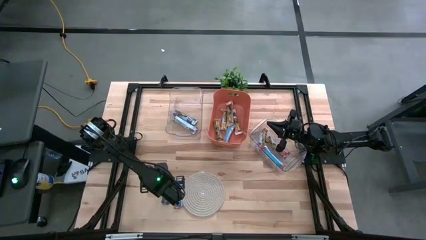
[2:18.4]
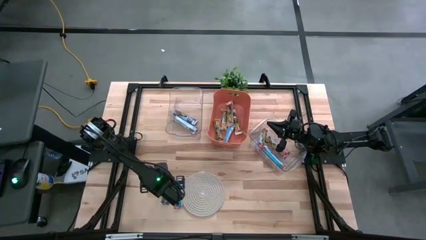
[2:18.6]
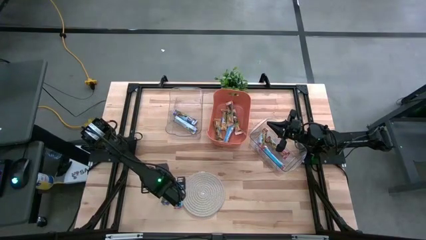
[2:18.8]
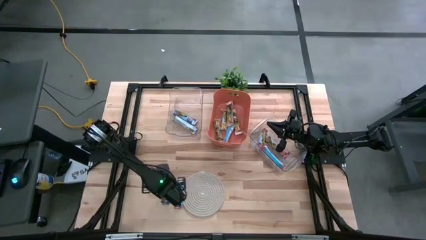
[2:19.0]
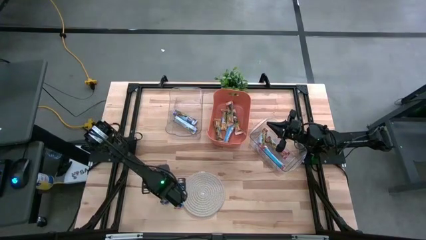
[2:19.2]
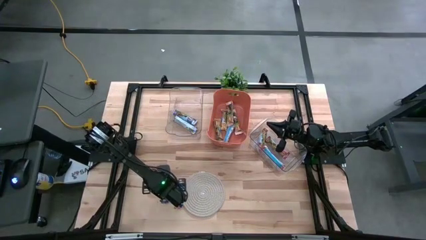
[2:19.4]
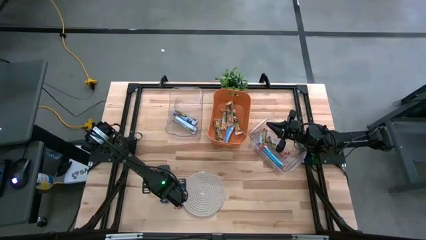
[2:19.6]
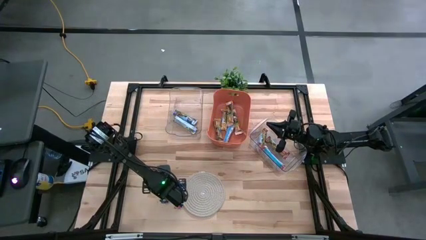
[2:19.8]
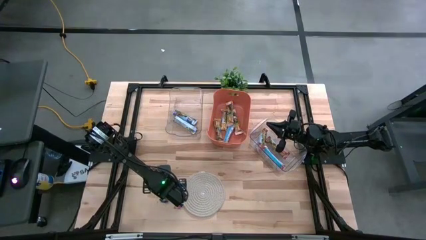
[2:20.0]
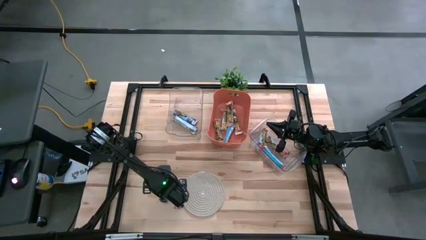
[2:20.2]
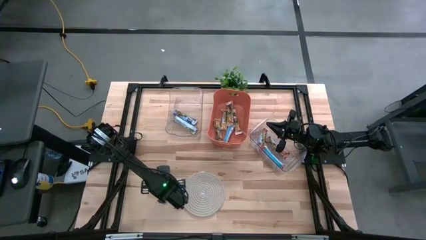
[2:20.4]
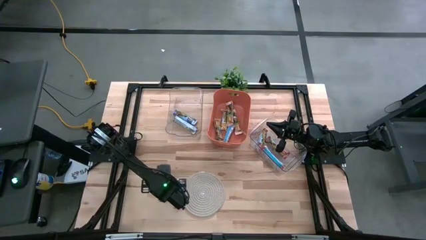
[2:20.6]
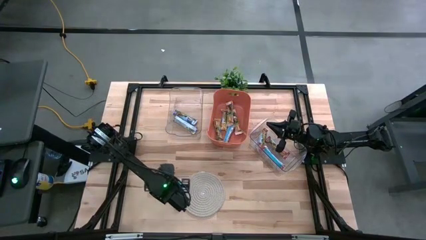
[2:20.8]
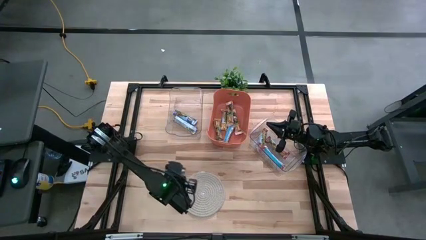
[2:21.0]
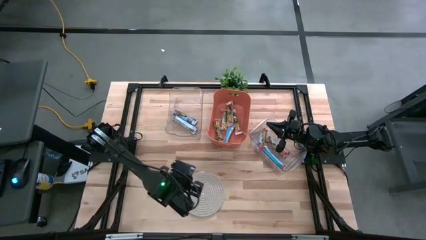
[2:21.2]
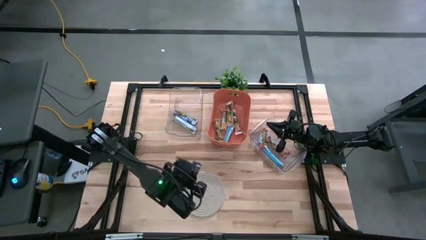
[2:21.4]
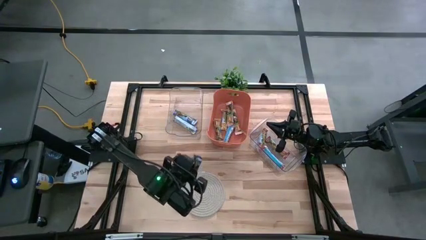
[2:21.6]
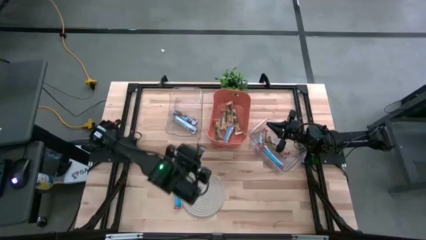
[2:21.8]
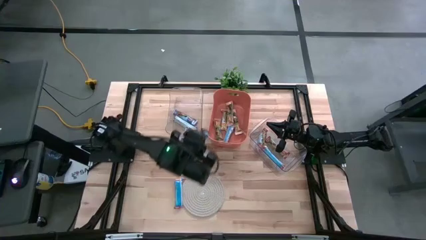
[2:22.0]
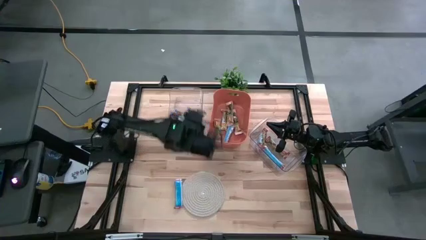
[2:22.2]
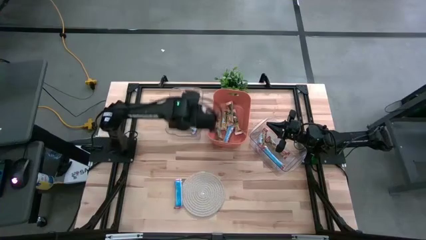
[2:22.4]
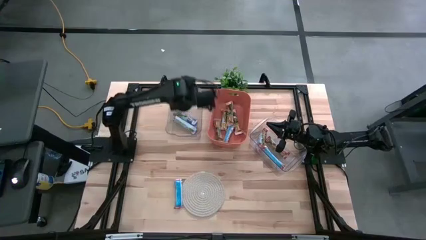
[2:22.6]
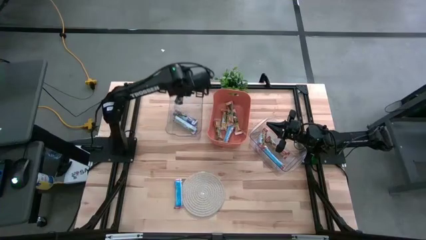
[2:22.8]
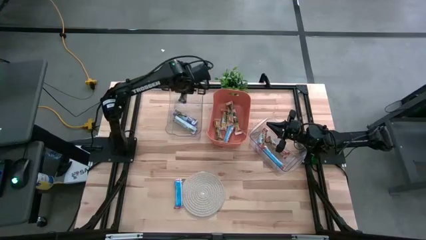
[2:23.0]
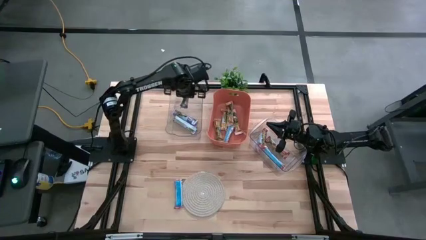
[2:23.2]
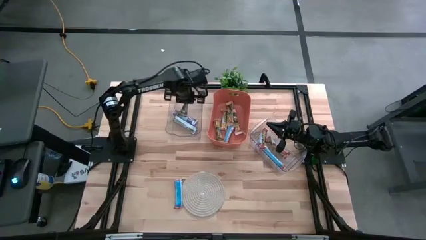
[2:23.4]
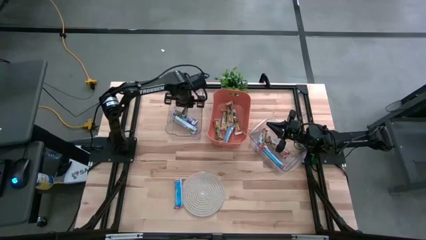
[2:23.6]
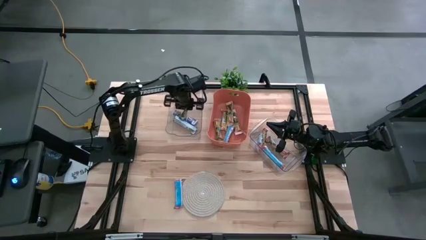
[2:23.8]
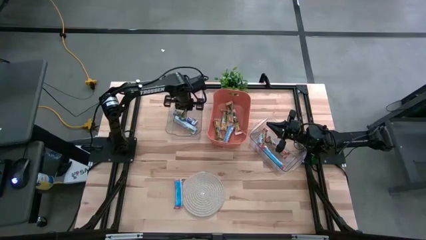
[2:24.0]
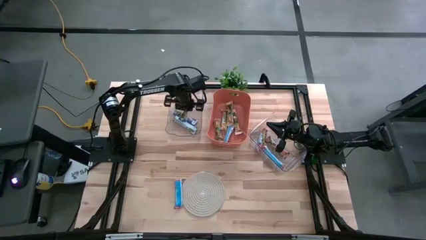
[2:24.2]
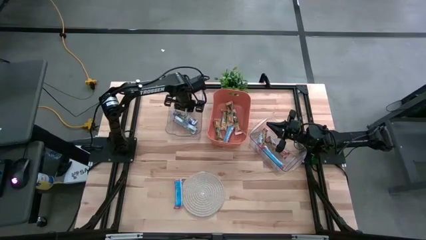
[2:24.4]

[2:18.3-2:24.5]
Task: Pick and place Granola Bars by type
Put the blue granola bar into the left transparent bin

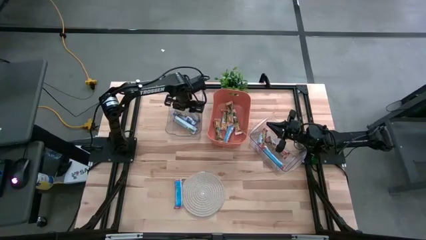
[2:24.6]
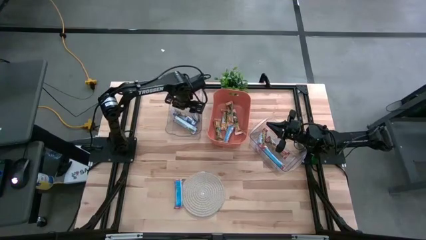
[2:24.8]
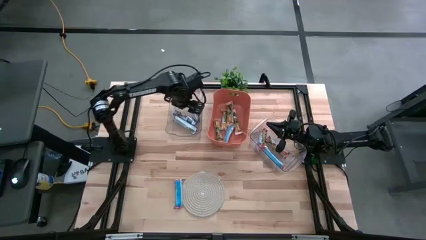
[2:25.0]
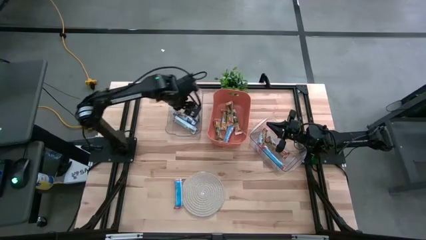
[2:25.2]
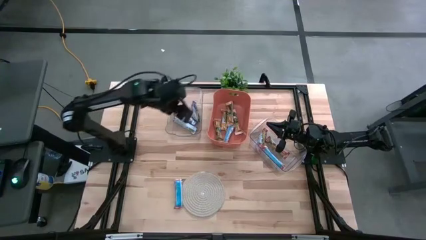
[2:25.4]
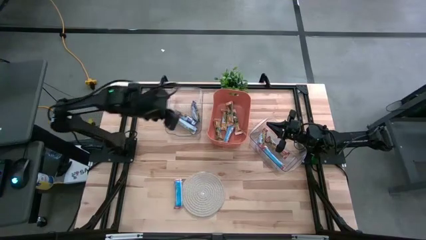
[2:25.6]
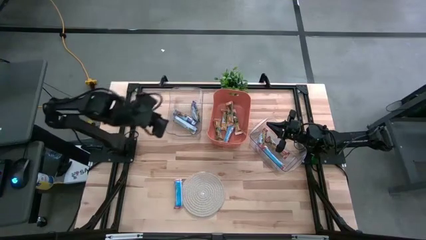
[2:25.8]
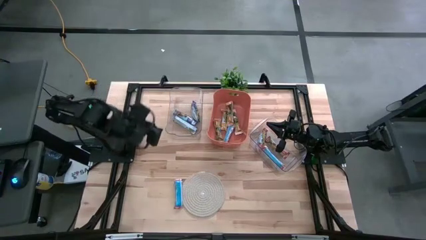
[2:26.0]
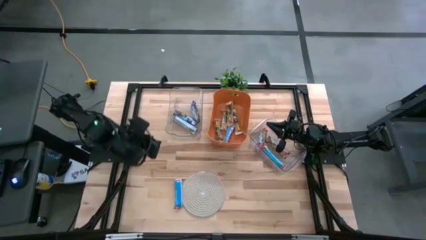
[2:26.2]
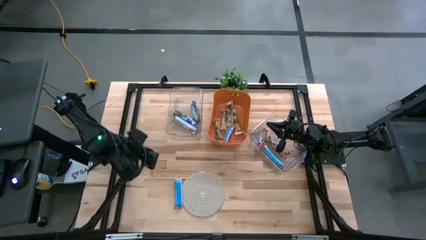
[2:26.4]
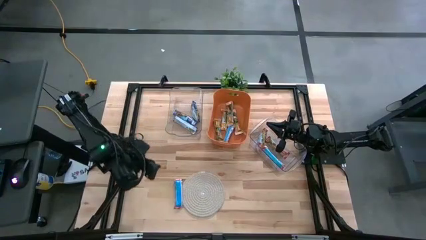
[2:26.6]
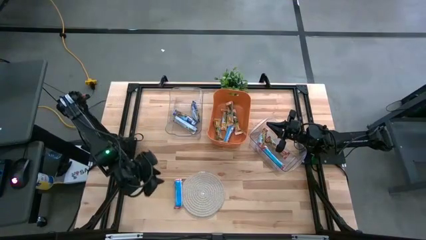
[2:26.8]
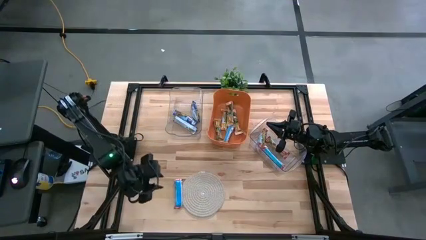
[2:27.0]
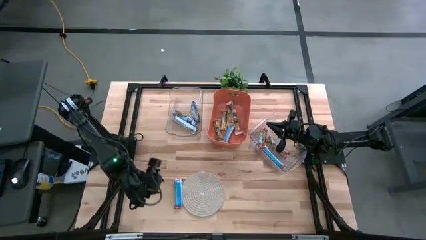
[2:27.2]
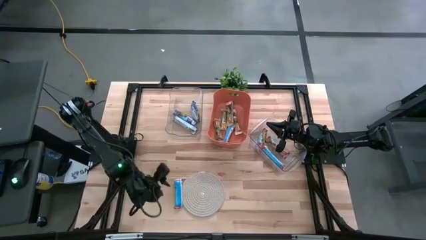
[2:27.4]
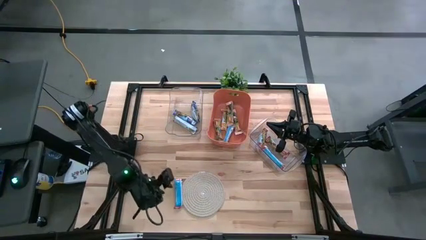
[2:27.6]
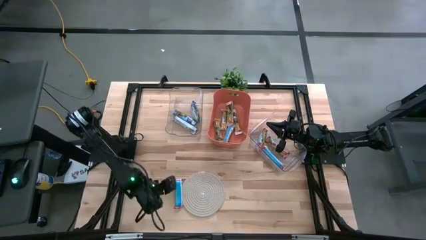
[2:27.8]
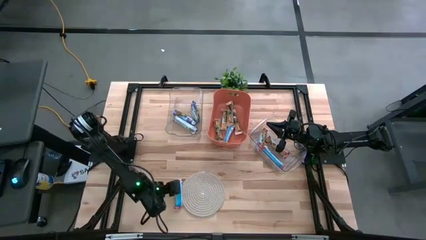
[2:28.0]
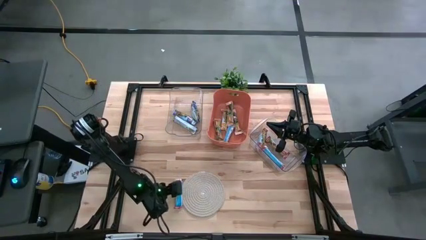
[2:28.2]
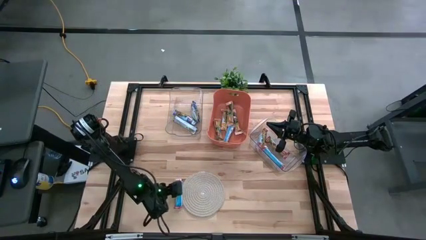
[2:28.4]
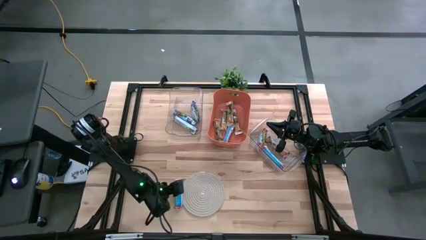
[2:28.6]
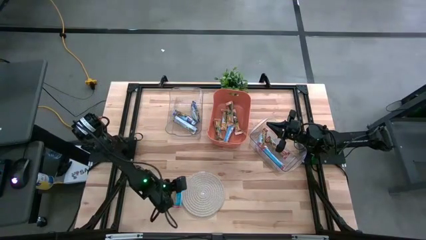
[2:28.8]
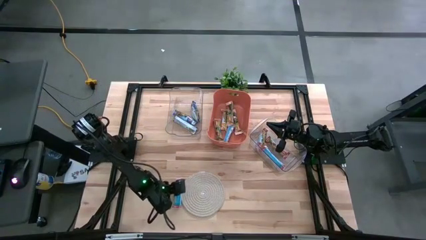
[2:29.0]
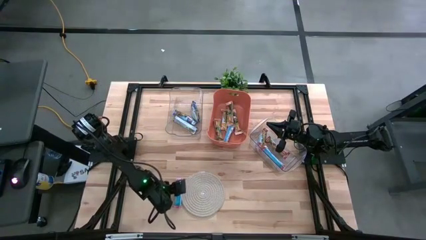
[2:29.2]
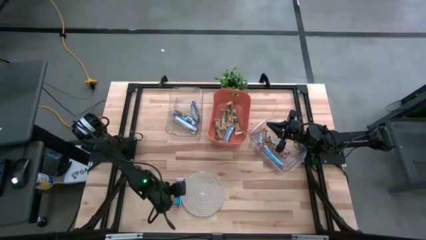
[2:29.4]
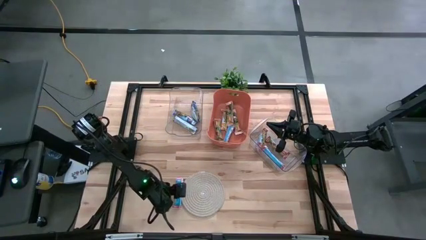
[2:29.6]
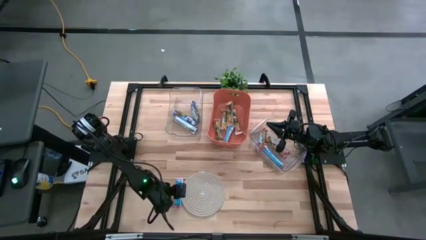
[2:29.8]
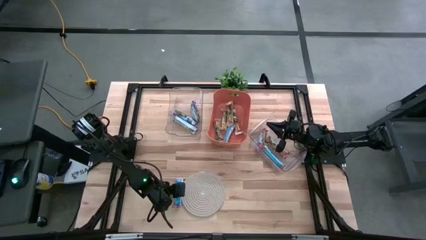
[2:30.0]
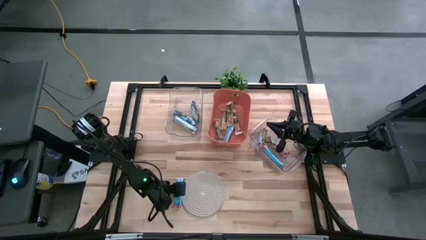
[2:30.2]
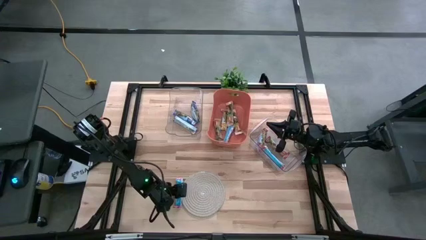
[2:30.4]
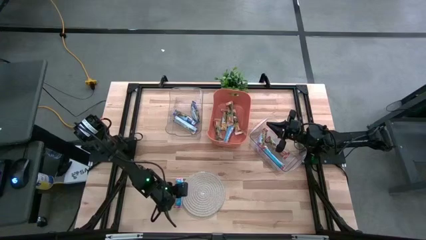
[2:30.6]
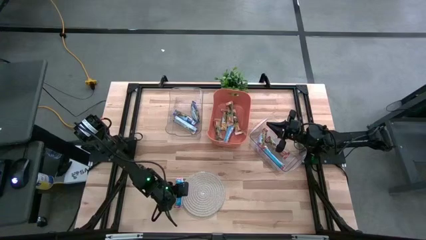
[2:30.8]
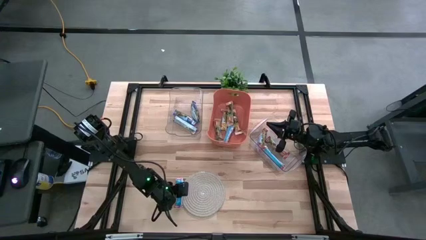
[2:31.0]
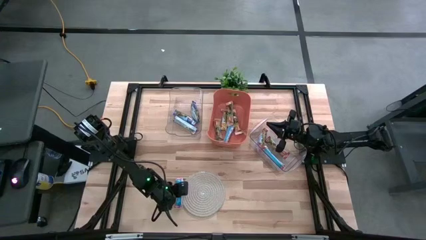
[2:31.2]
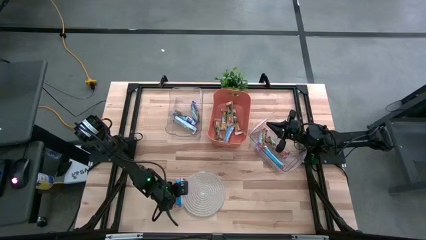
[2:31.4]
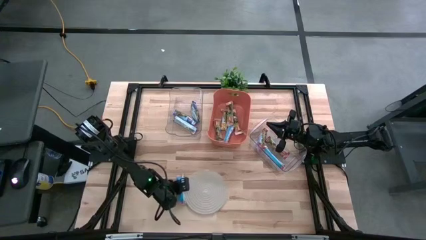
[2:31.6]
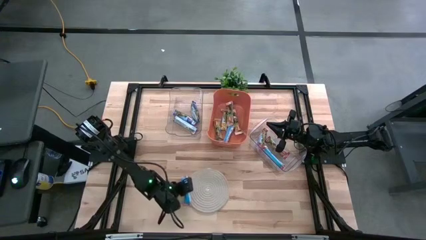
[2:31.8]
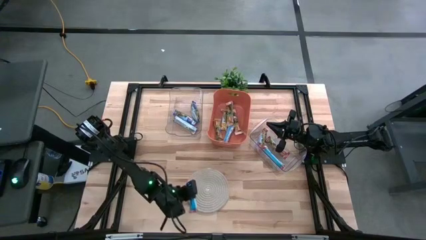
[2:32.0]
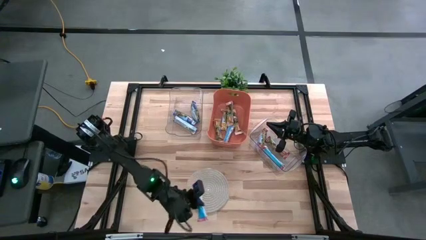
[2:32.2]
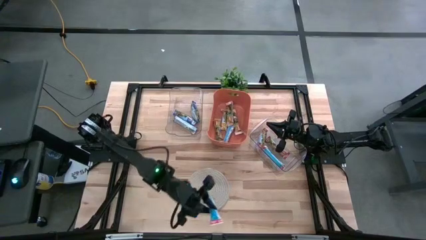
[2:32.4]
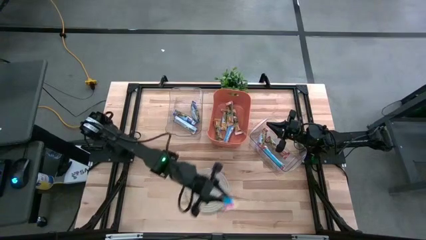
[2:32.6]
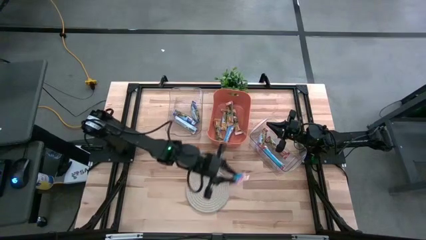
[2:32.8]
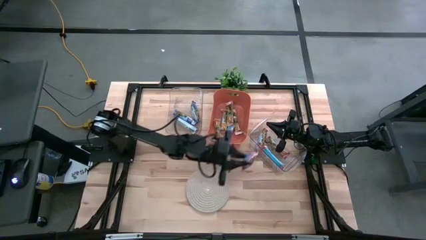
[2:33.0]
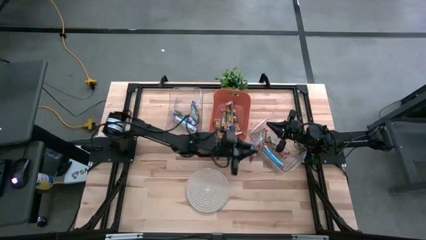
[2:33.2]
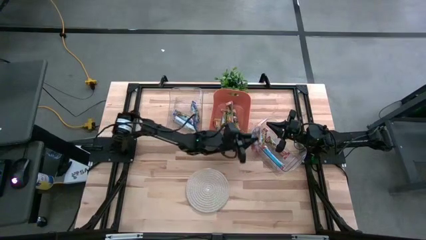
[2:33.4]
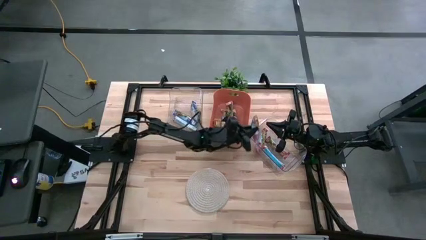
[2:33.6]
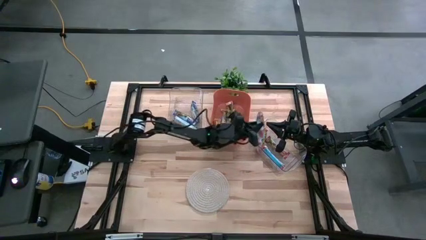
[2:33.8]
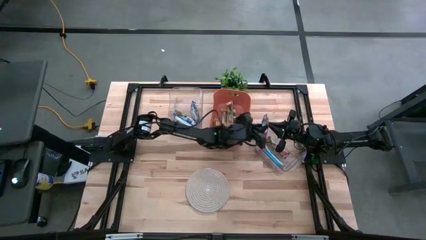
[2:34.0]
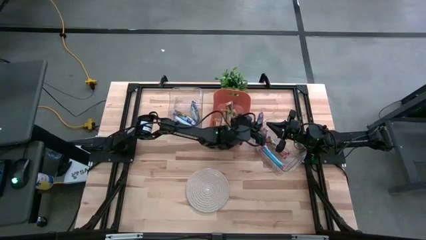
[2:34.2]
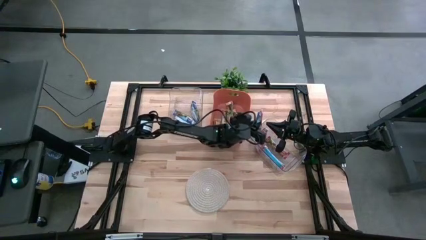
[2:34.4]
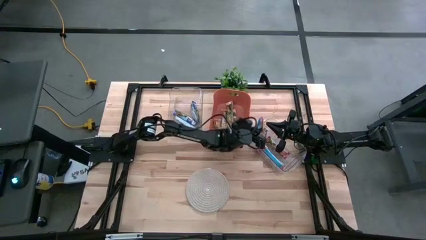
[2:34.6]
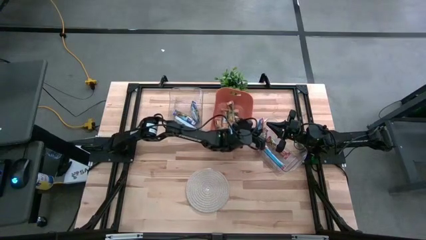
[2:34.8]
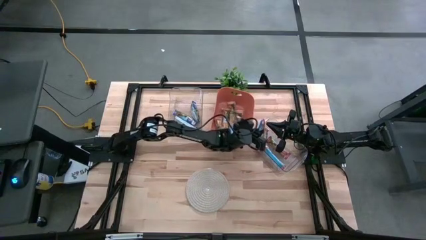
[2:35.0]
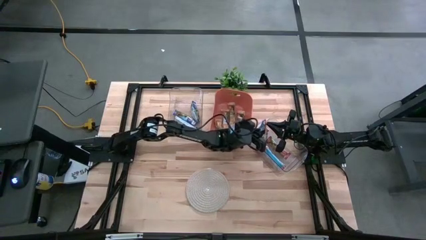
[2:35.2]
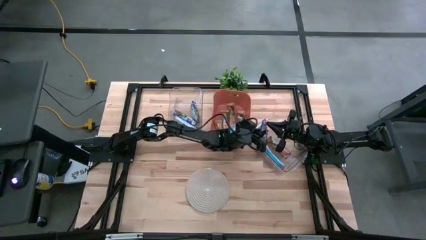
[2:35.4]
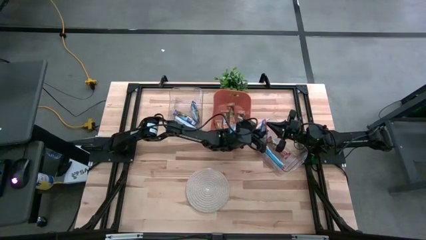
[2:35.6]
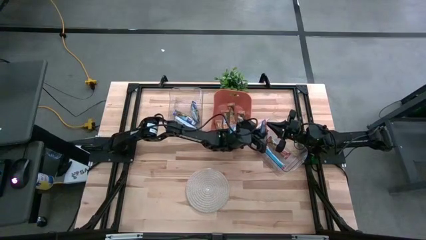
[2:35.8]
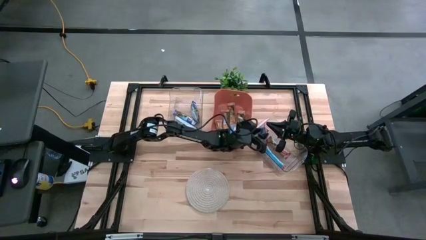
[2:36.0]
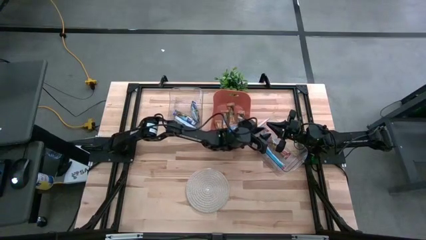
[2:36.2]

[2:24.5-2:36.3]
Put the red granola bar into the right transparent bin
